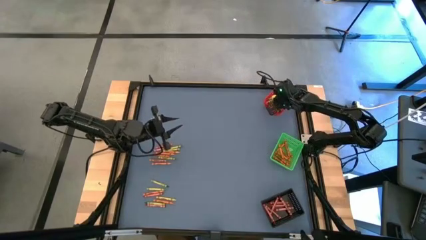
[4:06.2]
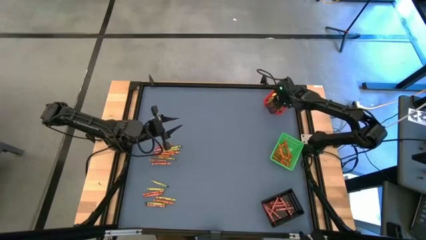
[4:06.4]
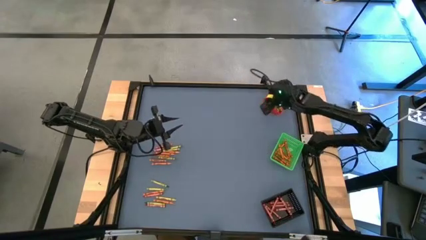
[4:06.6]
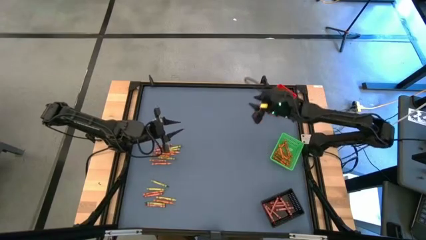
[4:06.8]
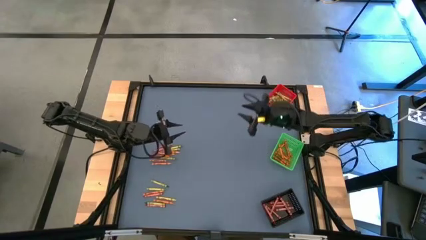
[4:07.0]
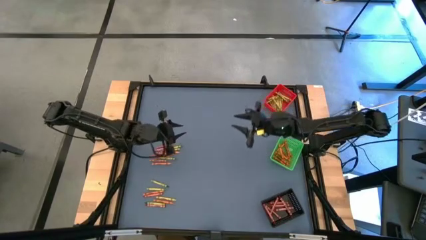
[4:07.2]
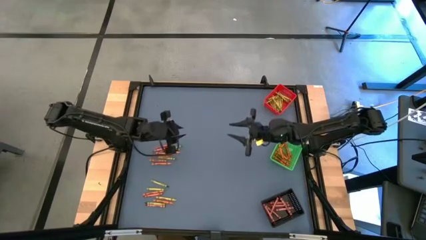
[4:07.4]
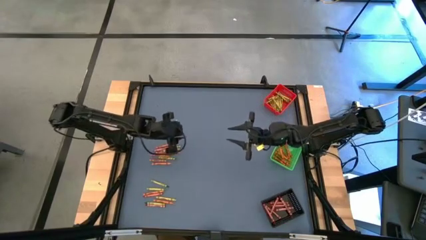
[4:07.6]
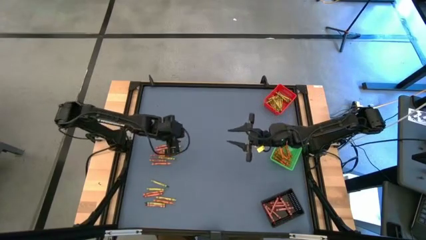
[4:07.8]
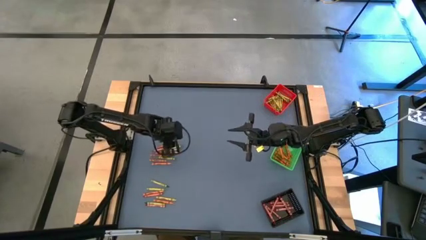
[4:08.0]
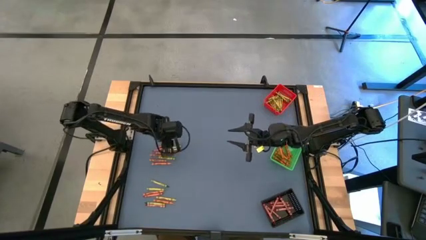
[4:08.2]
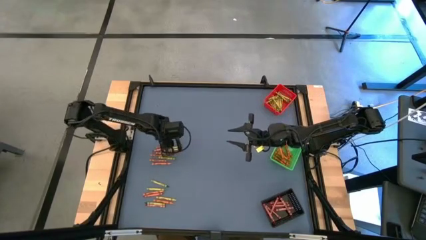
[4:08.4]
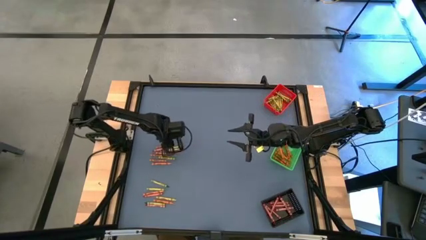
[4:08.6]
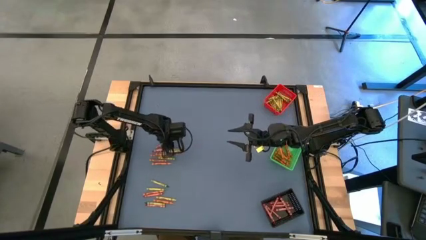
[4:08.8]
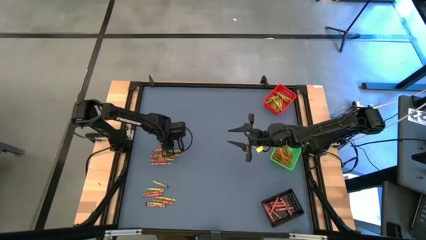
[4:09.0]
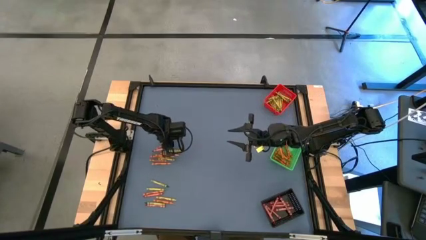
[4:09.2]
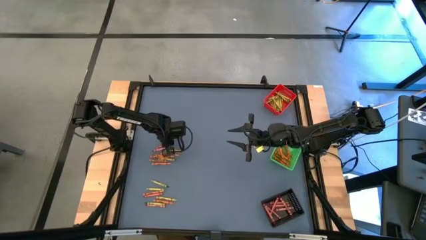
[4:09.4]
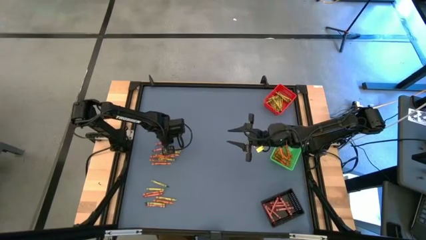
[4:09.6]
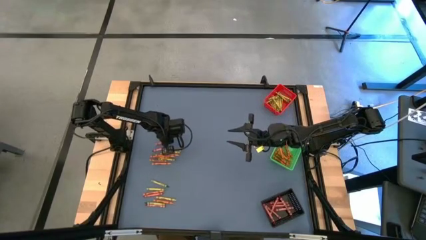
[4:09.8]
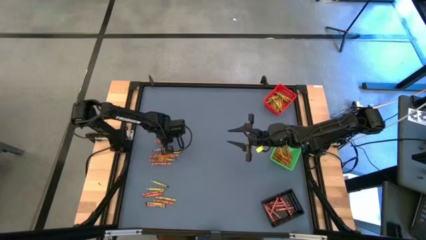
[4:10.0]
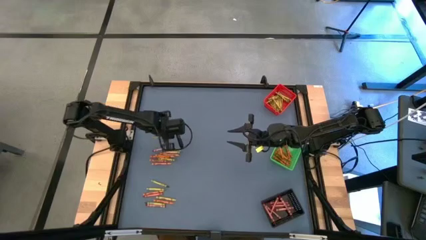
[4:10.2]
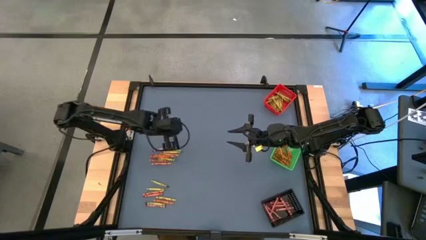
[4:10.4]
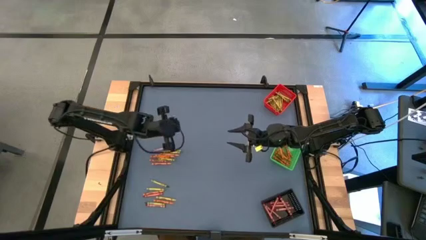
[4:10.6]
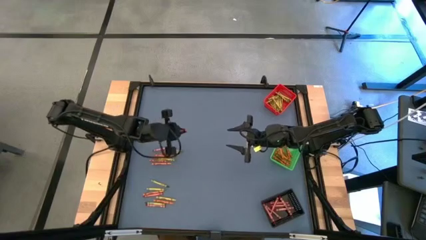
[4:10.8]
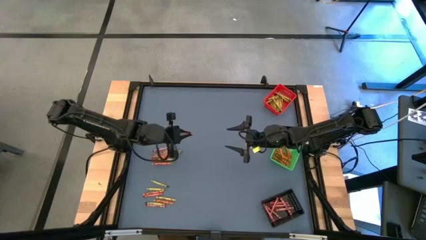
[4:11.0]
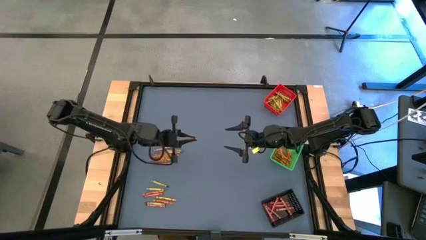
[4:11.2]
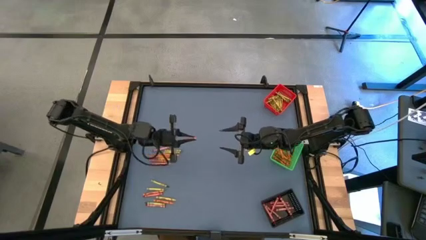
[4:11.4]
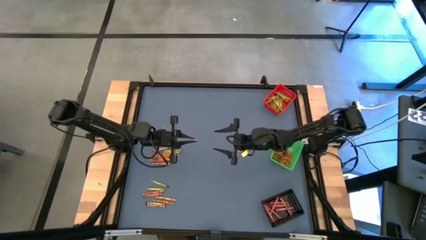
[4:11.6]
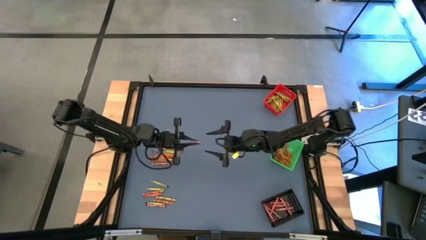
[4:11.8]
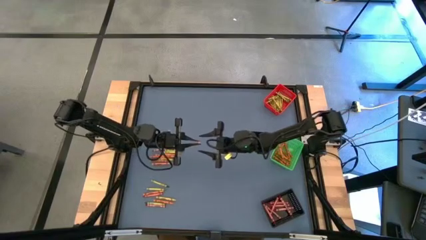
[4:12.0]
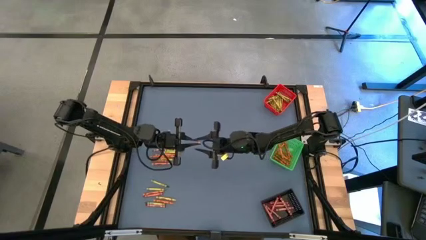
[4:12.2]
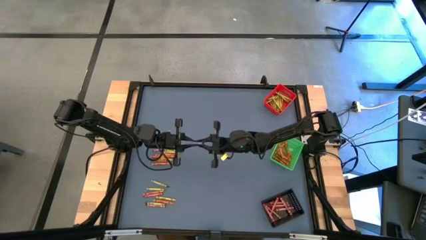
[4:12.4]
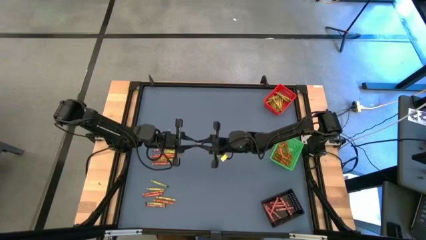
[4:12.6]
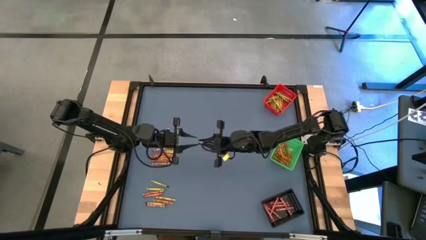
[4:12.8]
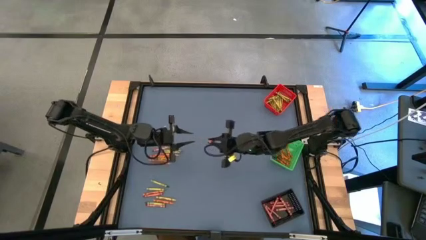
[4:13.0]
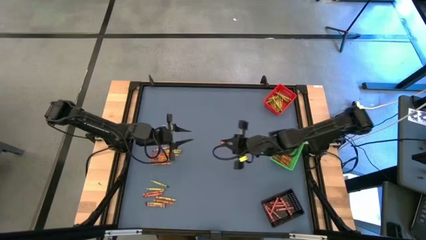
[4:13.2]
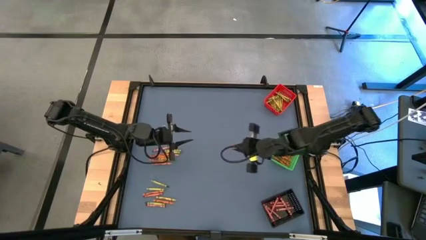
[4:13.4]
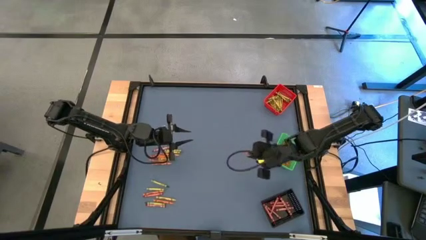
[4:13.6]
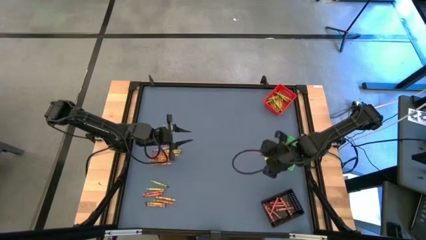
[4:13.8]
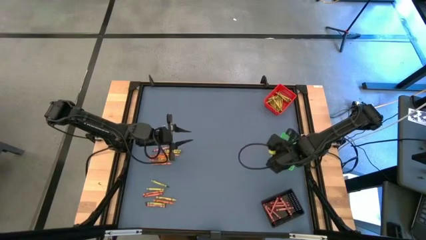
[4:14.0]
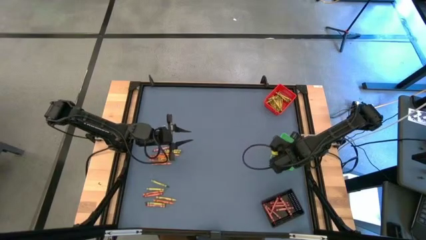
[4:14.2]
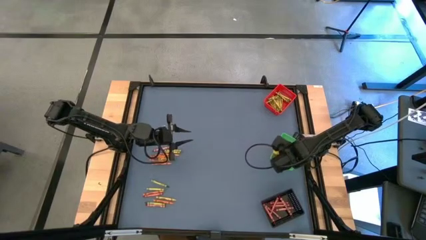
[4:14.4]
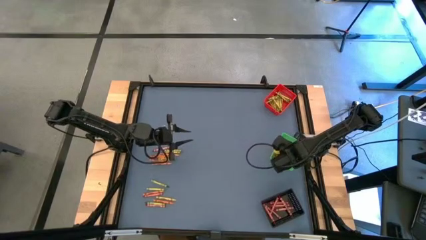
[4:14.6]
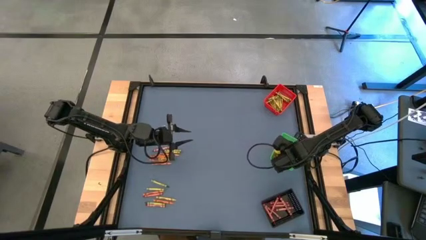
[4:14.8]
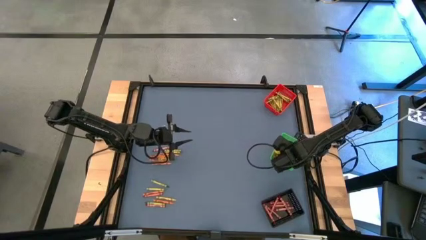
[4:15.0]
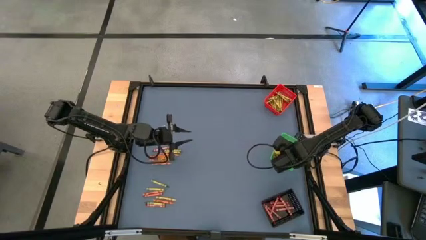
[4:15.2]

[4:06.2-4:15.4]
Task: Sort crayons
Put the orange crayon into the green bin

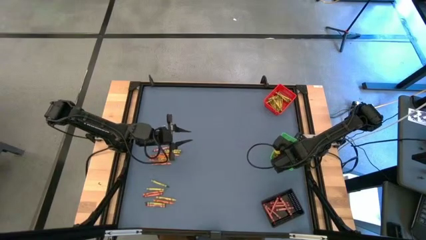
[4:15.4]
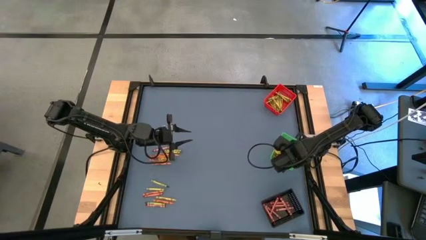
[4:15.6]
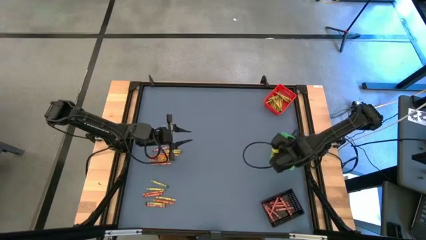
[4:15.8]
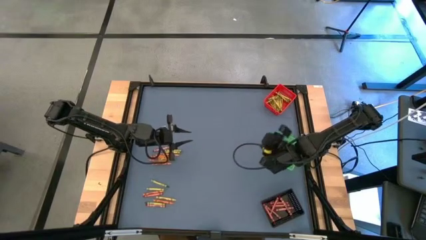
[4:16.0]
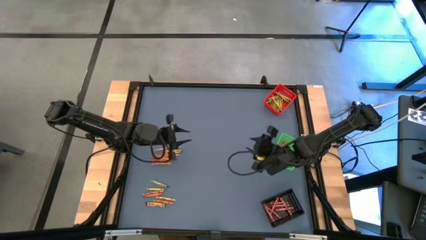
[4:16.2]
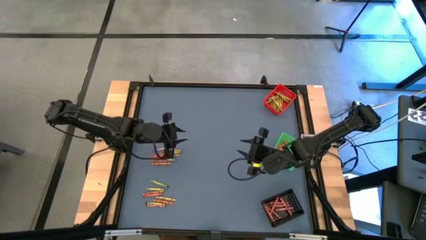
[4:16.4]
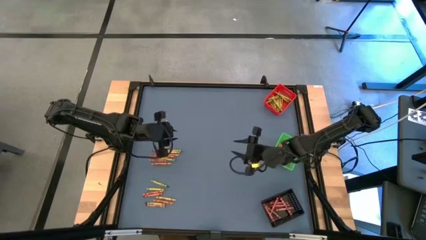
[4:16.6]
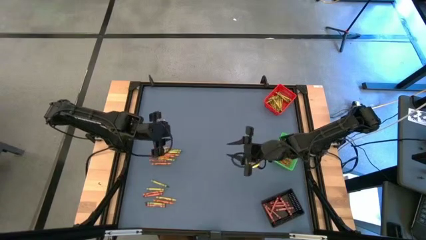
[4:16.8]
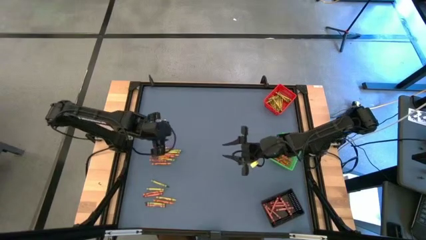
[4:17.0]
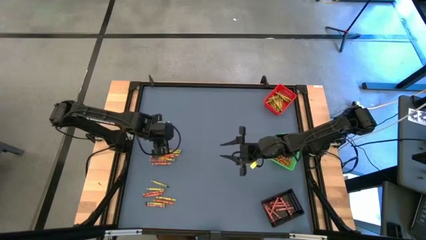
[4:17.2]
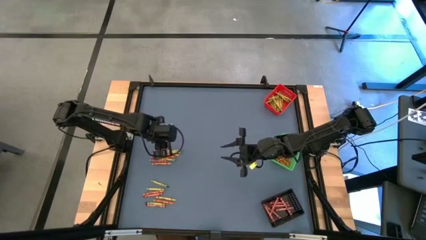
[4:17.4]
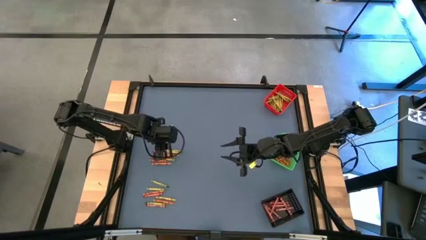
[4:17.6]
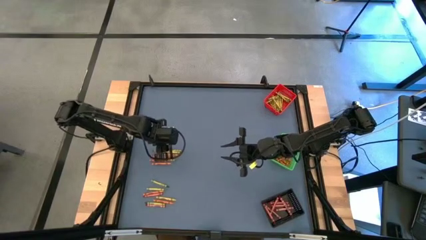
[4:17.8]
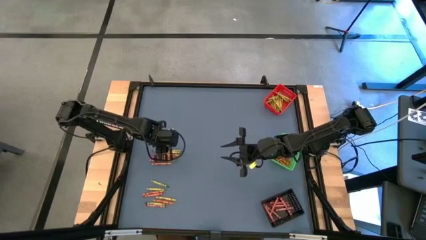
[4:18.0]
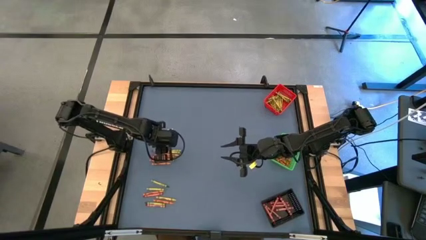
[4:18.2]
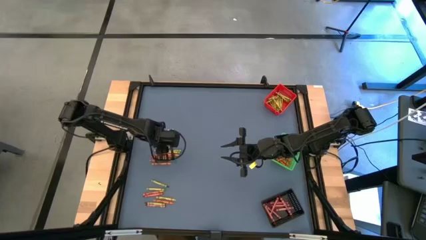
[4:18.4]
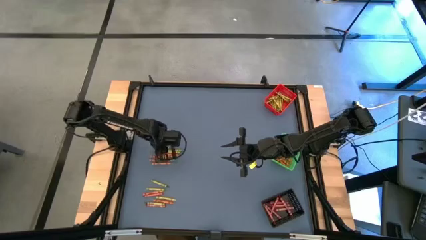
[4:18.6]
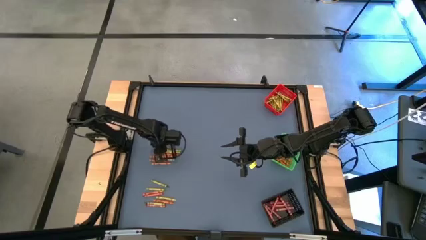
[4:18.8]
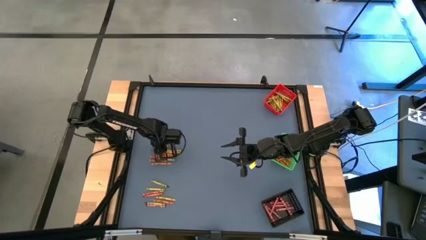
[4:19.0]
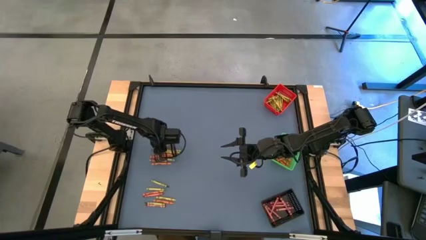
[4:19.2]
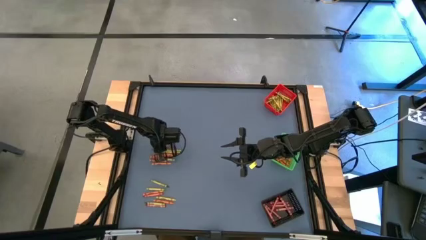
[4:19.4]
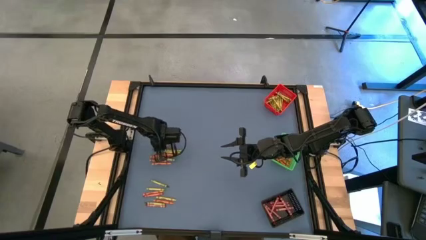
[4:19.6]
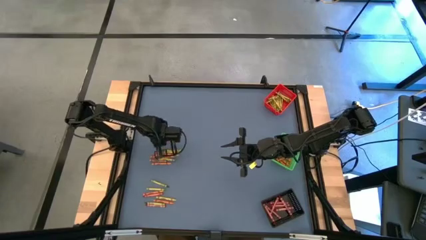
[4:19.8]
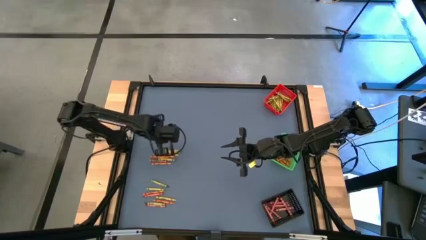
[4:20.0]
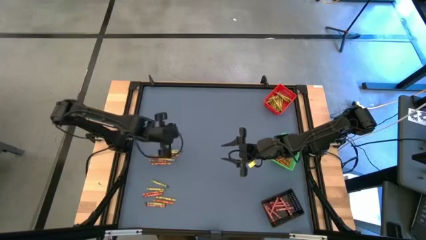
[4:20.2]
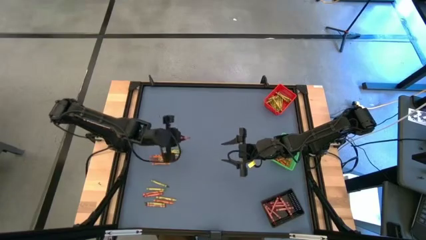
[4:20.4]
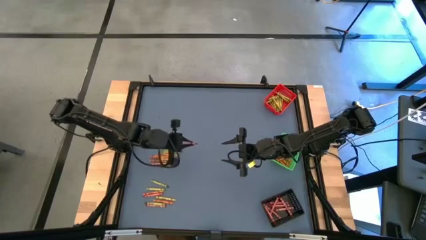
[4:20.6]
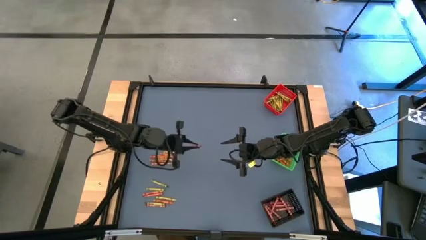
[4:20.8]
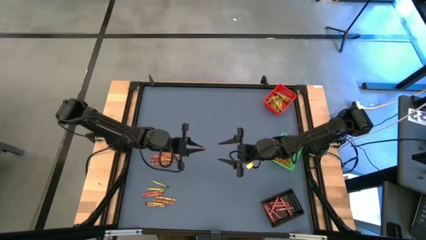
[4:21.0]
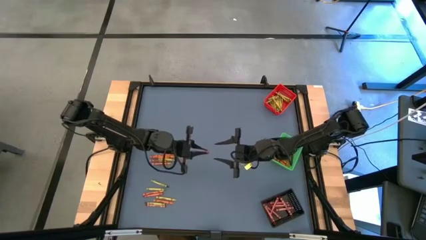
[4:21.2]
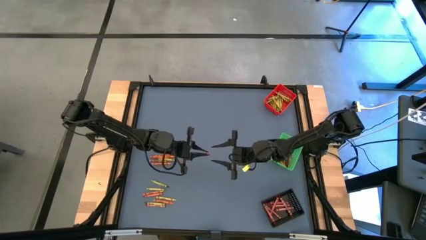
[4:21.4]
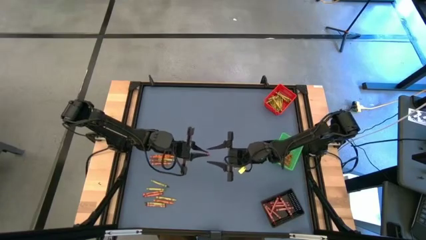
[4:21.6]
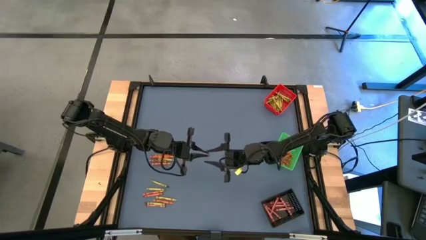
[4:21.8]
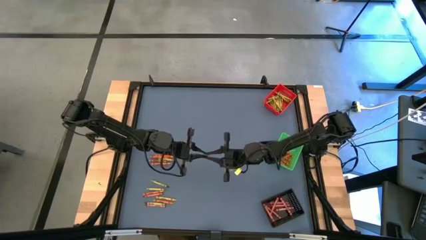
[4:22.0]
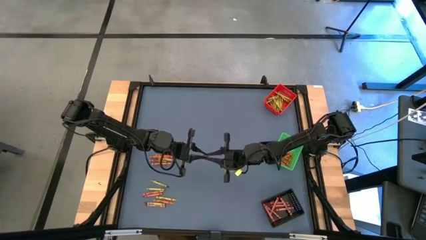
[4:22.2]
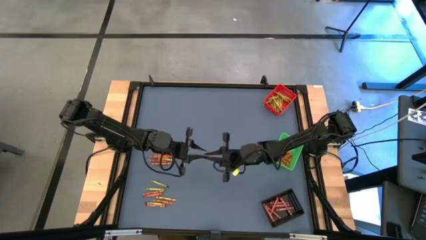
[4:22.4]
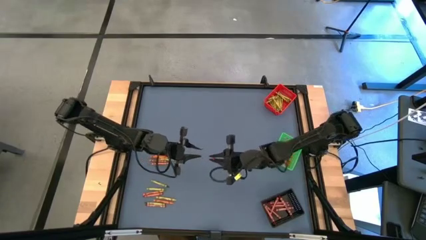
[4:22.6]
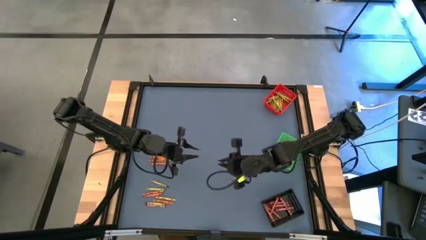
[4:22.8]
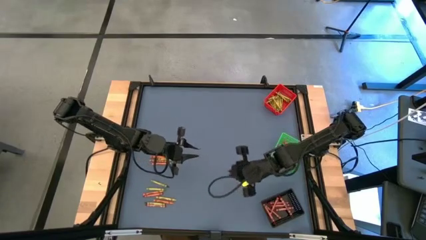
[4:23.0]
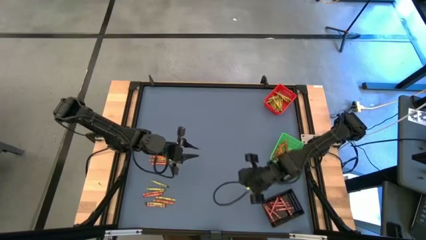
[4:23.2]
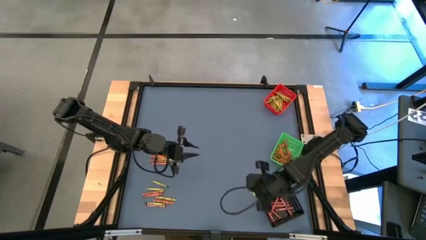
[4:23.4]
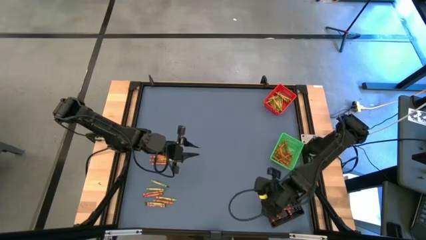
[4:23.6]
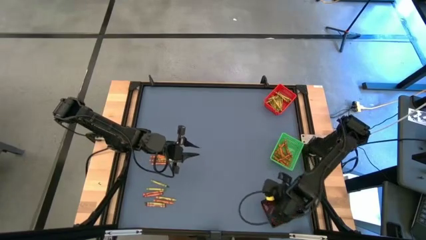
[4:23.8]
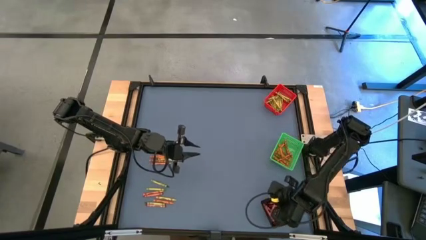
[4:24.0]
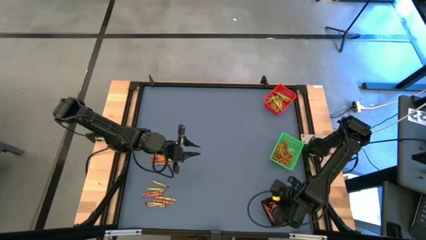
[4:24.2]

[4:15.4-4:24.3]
Put the red crayon into the black bin
